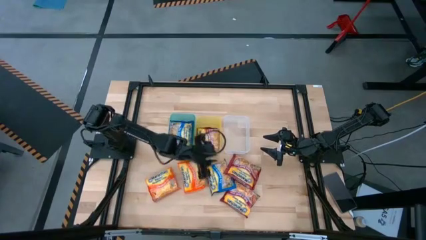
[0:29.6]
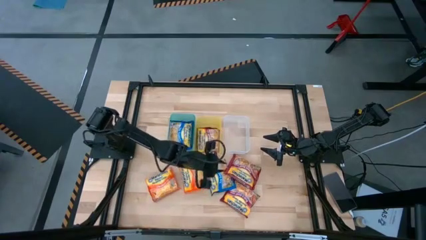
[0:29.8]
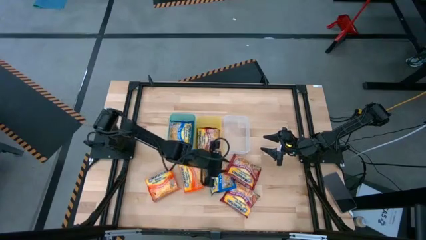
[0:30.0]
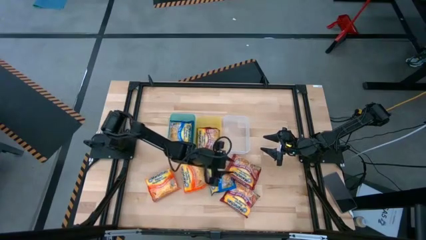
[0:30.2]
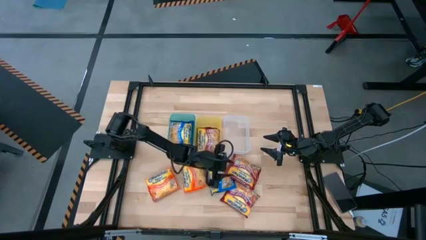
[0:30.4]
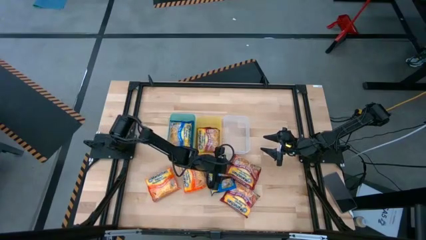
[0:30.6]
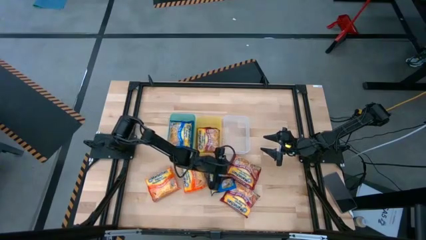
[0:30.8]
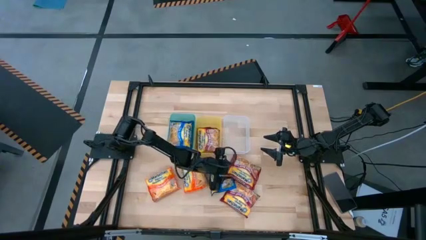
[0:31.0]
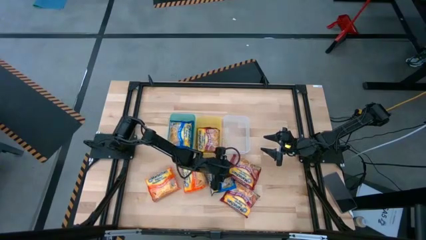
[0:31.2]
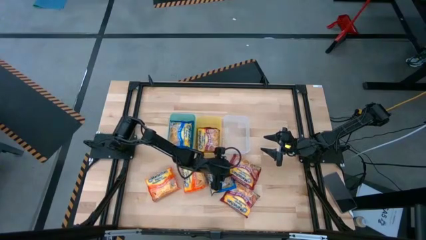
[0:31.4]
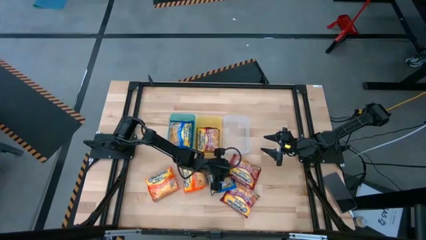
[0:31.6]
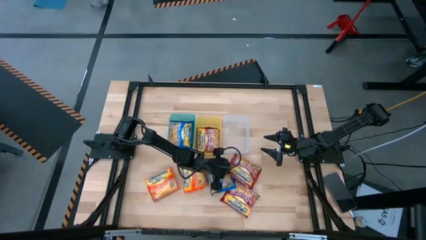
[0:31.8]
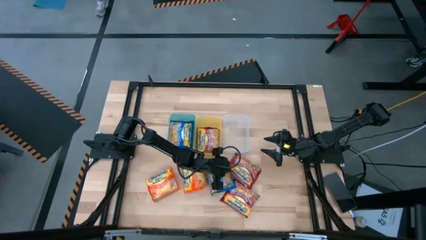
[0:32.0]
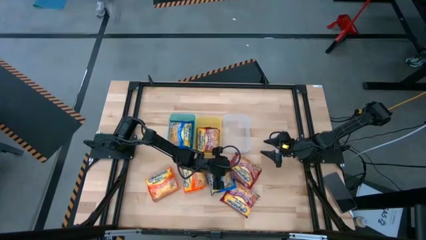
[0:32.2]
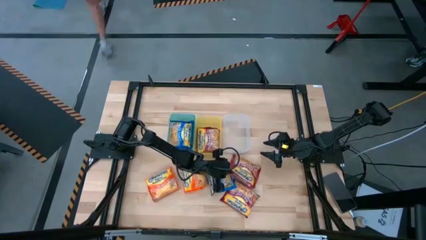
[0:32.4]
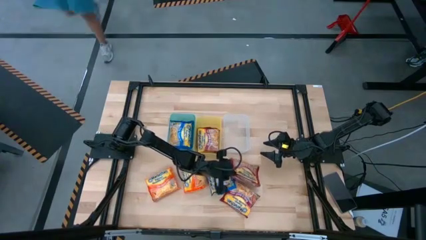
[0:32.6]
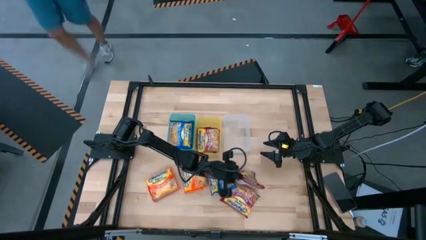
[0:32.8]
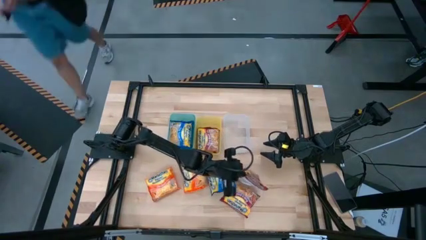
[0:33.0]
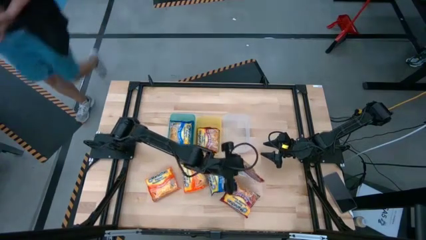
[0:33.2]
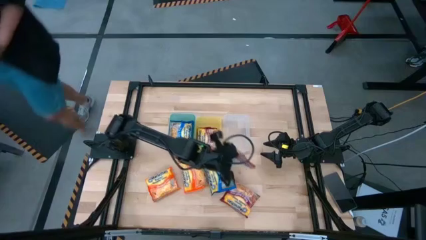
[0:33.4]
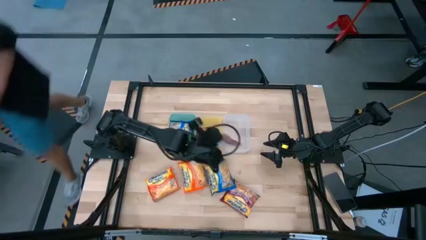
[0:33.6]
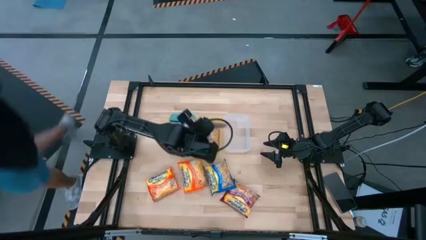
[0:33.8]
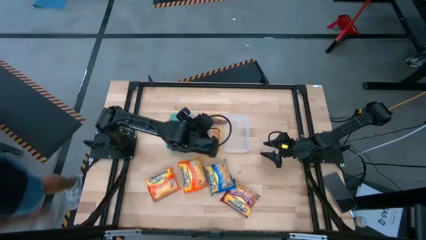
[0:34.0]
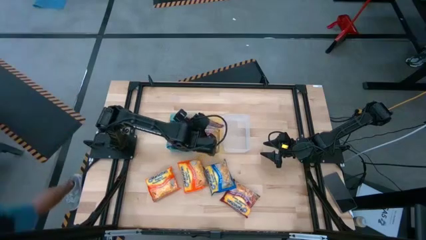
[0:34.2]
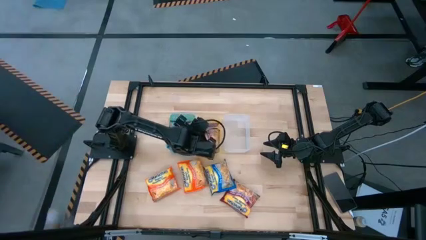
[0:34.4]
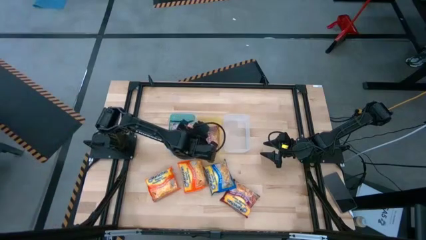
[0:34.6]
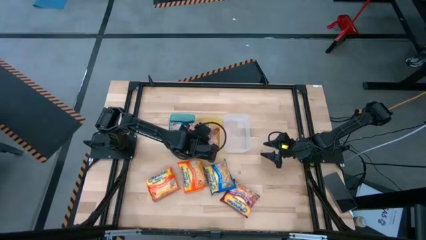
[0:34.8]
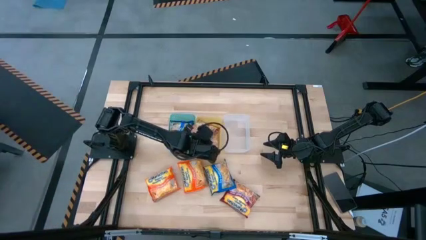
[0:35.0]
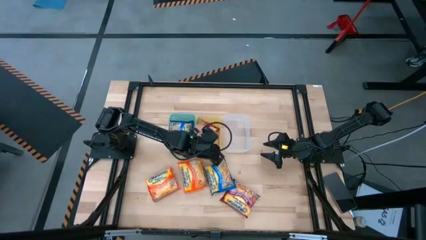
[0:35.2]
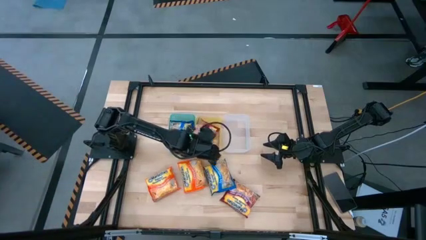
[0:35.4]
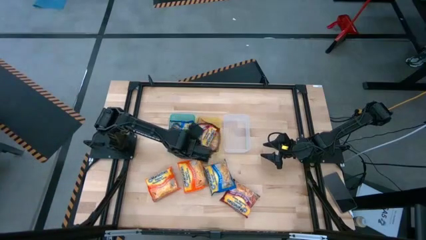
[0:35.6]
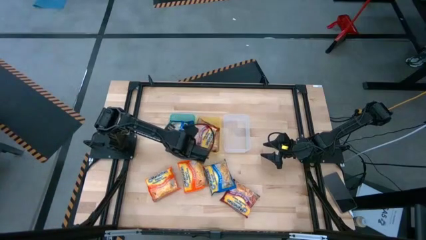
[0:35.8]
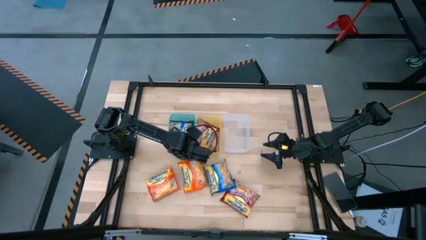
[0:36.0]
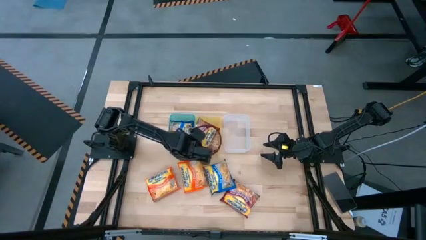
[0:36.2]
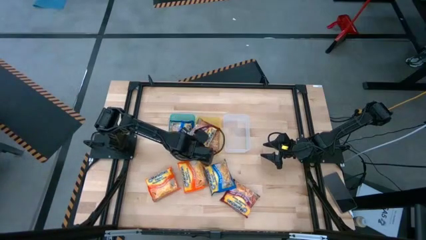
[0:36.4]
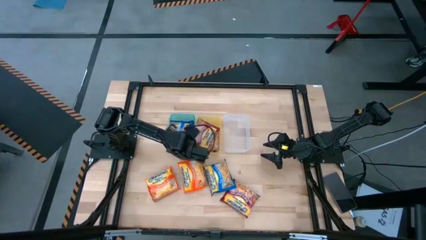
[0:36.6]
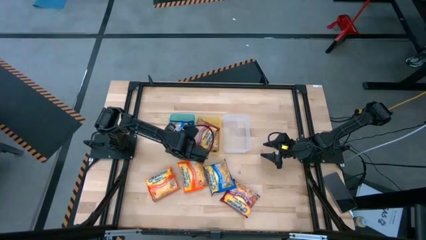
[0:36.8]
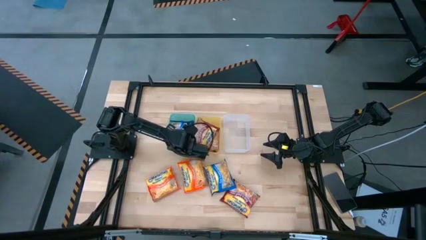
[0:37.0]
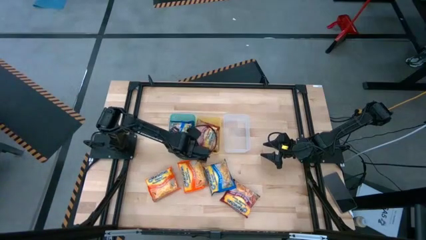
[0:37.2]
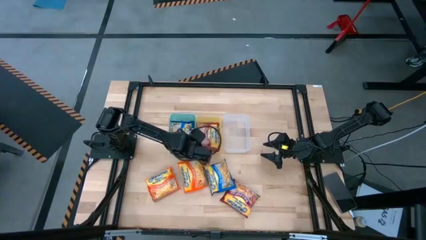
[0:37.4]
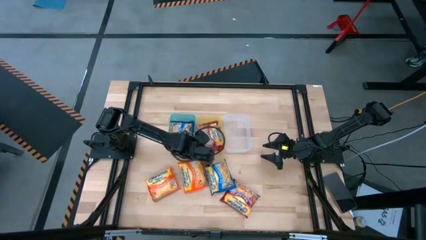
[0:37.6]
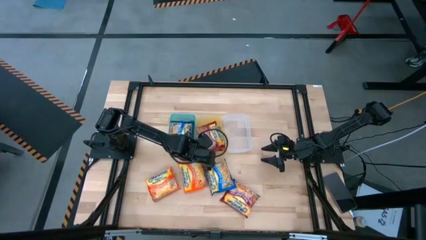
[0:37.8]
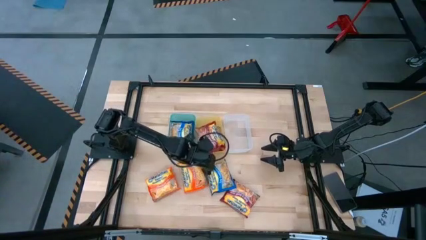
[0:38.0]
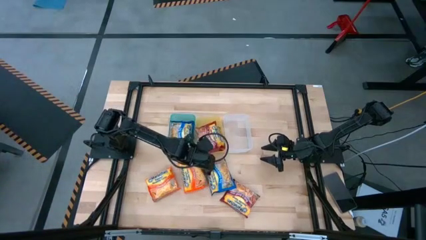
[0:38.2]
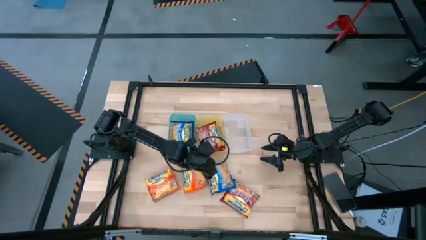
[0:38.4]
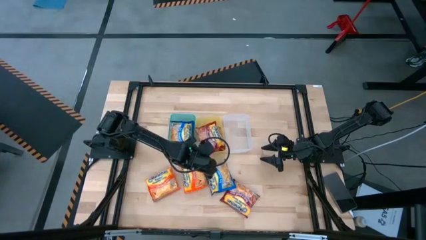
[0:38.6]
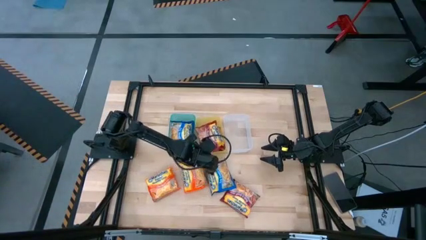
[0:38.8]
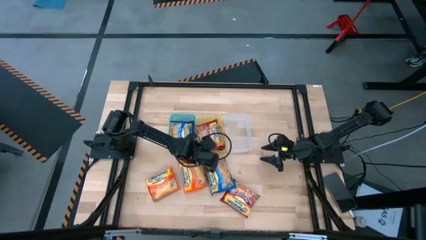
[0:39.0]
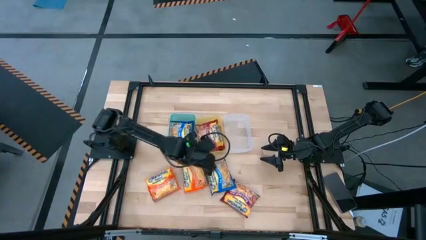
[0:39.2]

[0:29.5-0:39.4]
Task: Sort Maruchan noodles
Put the red bag into the yellow bin
